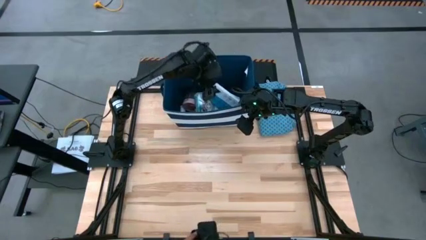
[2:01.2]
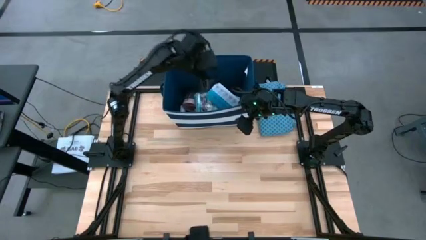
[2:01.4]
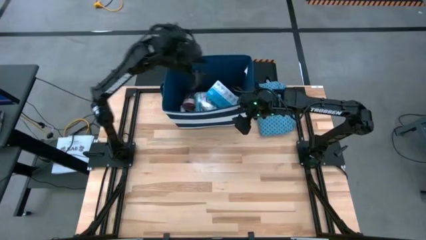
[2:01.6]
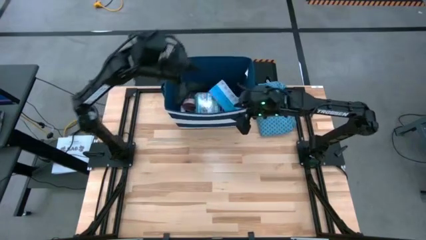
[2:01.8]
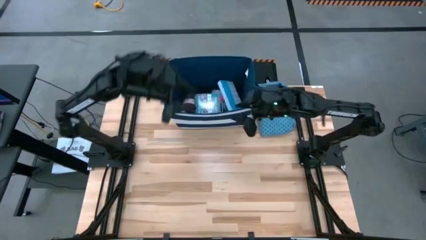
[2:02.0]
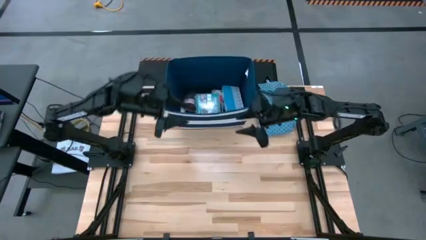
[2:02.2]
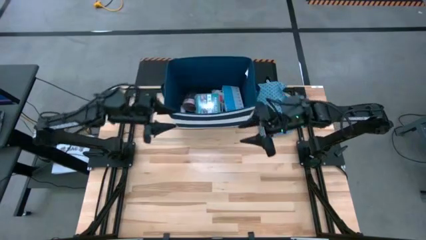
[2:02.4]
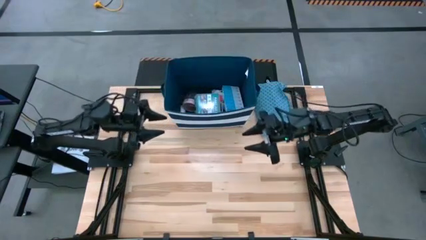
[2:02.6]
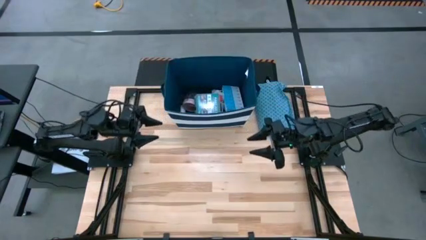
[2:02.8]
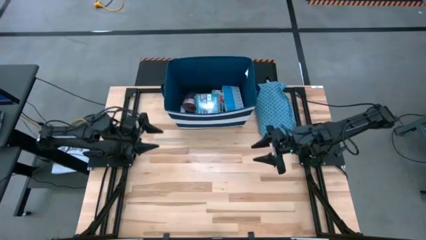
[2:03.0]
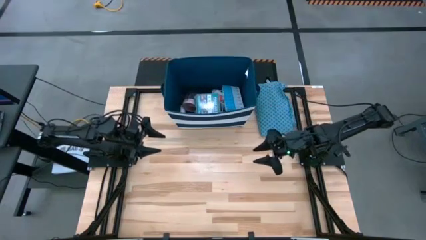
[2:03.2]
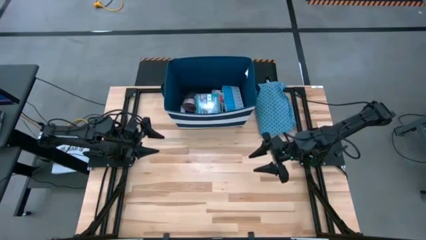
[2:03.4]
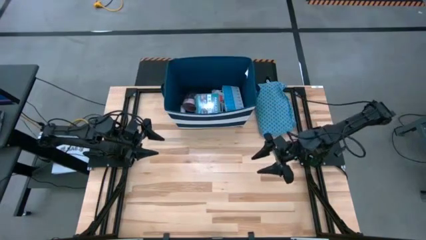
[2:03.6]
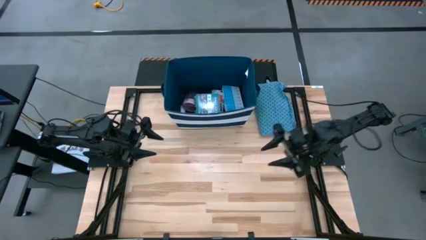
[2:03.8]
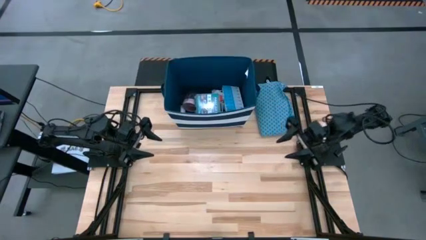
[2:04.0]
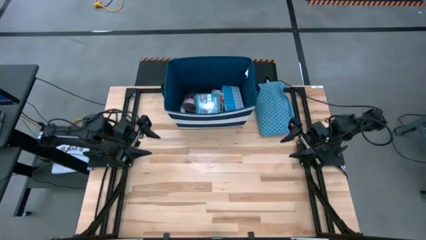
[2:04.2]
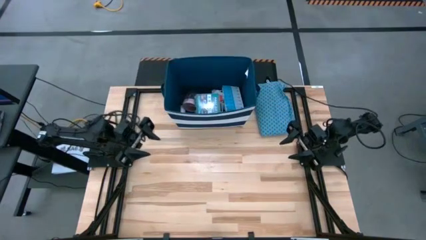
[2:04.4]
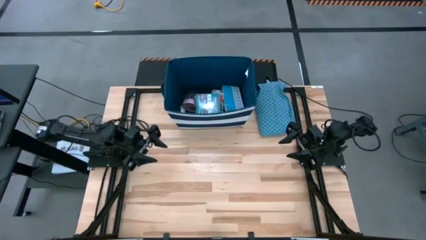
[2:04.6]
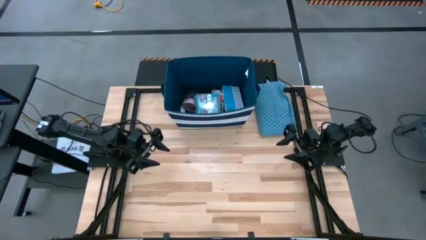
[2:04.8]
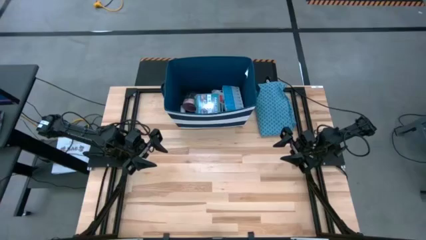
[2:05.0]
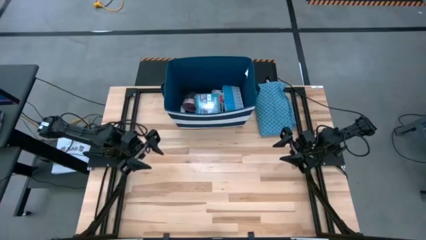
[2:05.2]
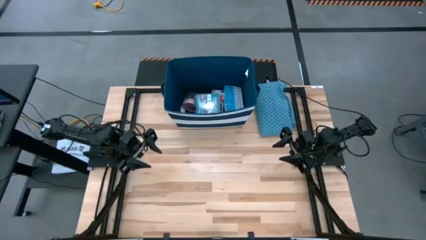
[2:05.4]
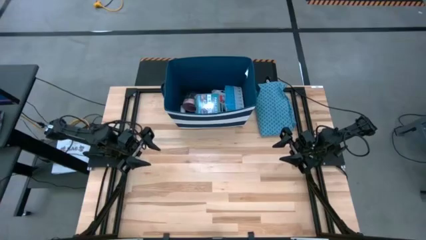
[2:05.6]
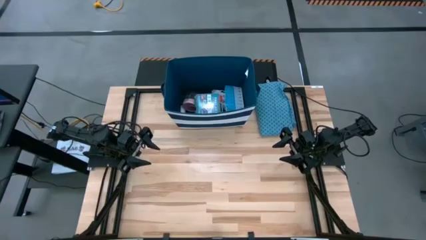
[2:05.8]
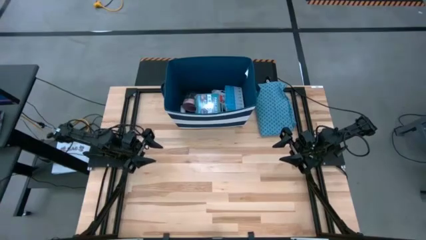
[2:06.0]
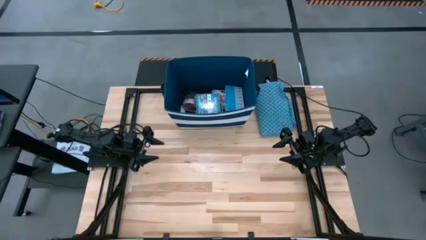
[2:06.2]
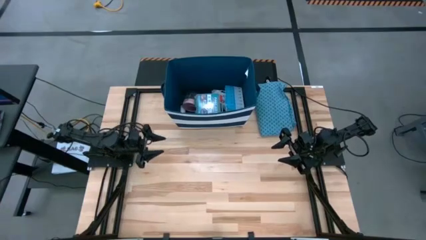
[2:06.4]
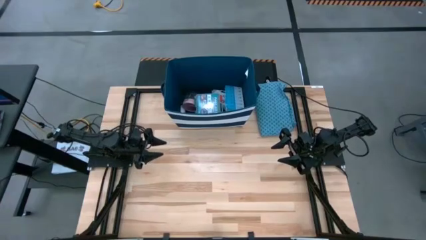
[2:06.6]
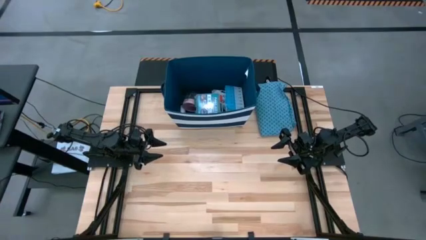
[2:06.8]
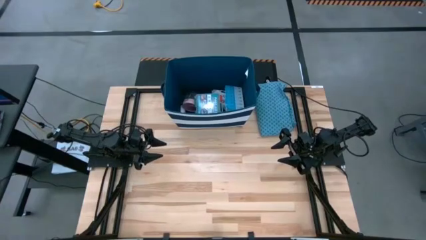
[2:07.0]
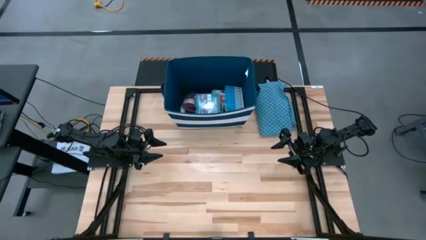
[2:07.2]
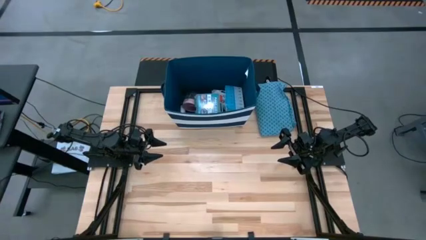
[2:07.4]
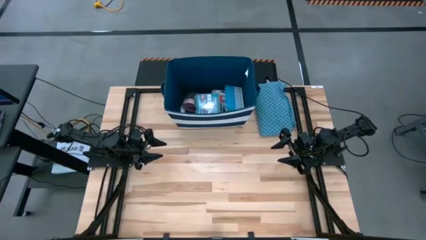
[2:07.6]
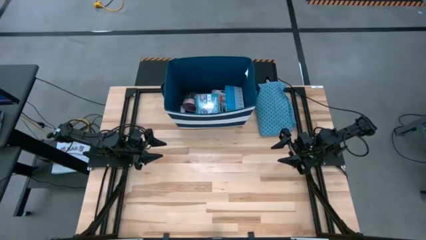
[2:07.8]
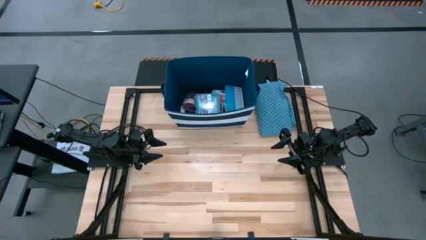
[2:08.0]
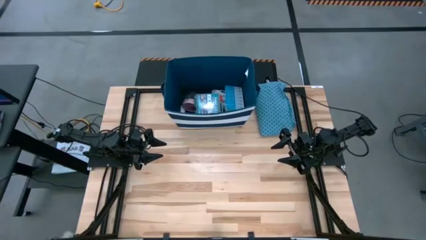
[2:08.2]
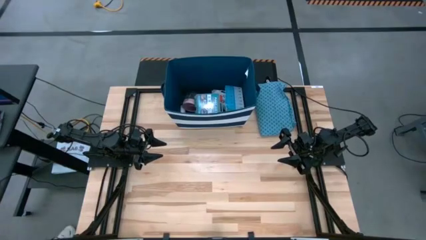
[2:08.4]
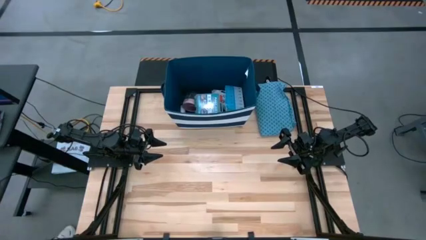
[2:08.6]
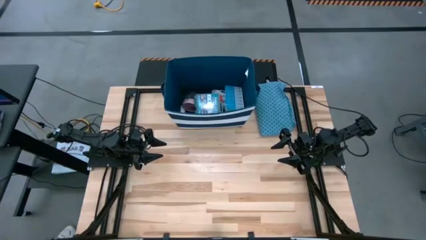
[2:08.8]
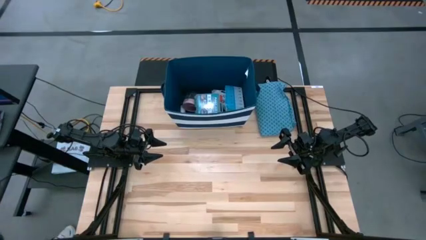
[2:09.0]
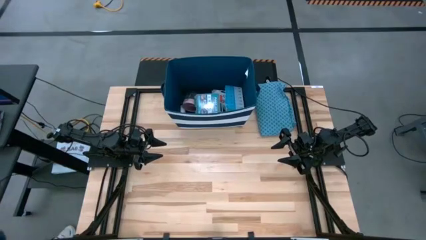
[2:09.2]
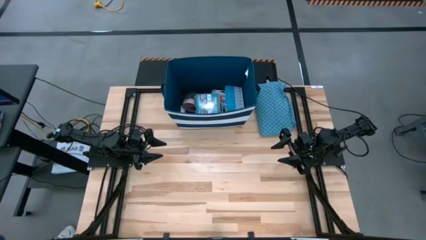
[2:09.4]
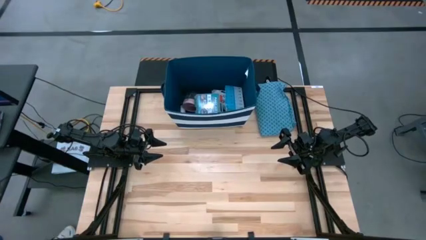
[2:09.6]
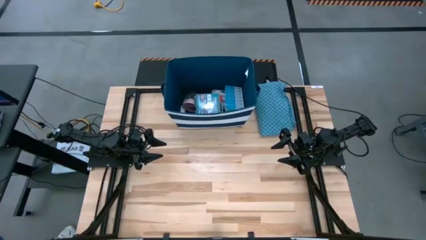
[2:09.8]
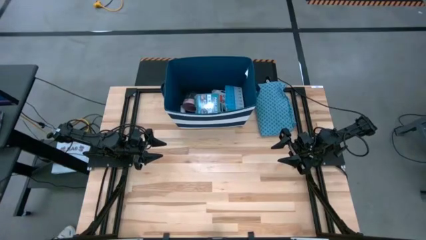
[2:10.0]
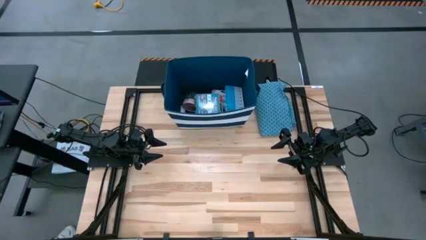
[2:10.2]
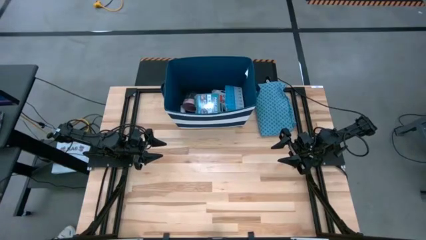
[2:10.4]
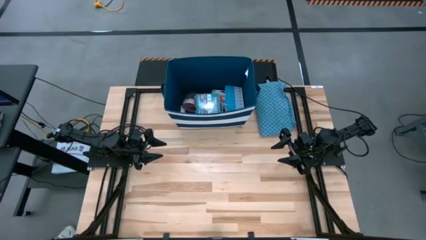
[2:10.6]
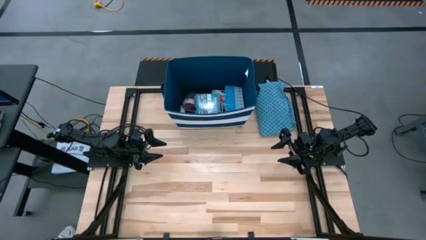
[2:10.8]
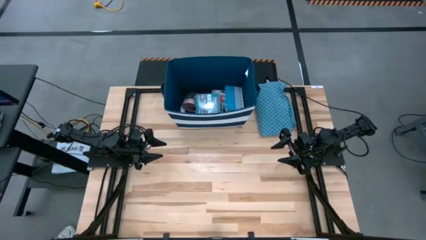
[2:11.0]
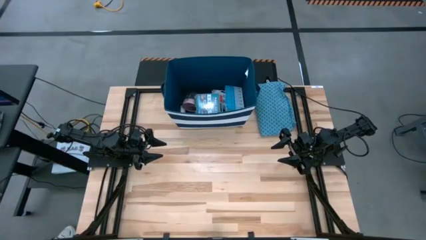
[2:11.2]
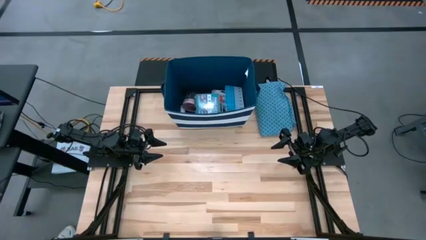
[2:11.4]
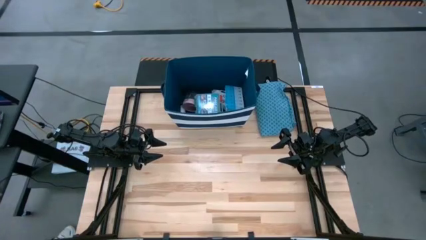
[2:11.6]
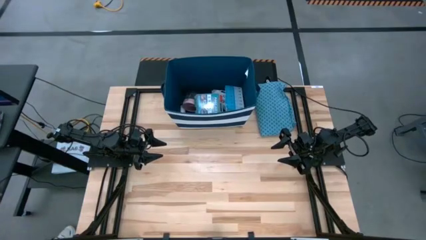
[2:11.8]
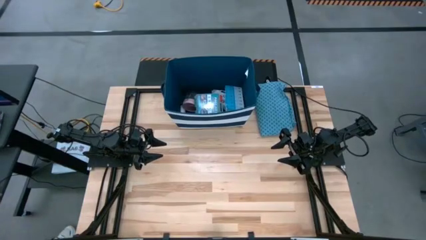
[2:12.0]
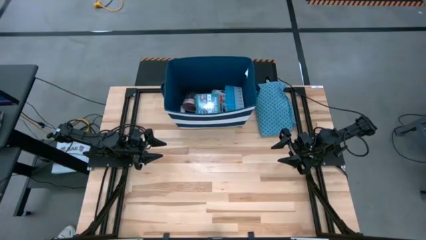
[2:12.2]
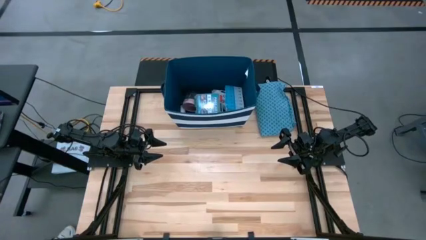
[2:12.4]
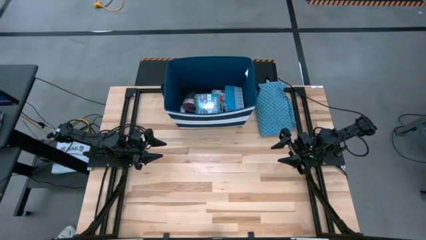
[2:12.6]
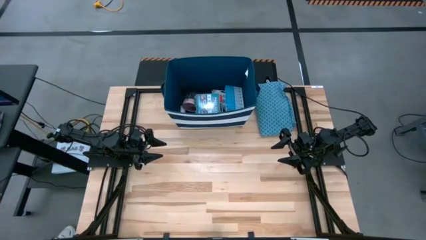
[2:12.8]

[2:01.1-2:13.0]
Task: Pick & place medical supplies in basket/bin
Return to Home Position
